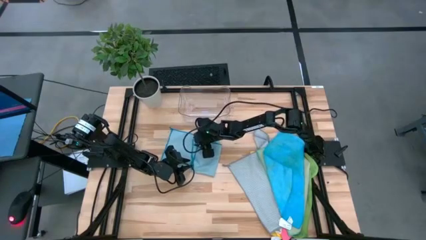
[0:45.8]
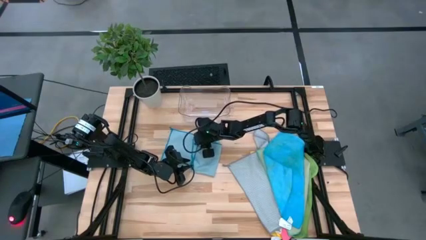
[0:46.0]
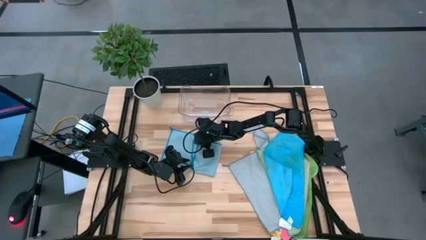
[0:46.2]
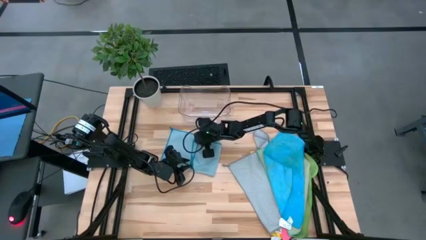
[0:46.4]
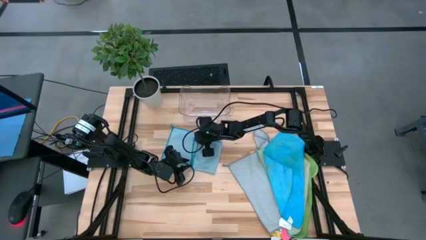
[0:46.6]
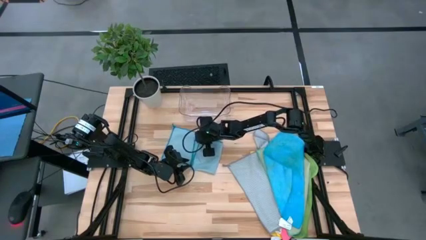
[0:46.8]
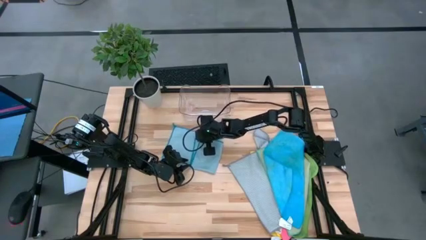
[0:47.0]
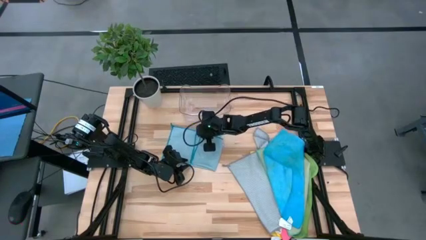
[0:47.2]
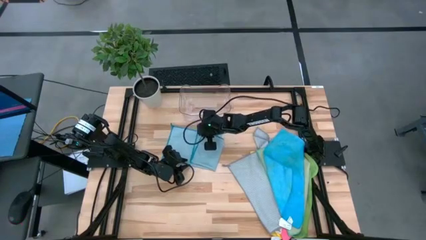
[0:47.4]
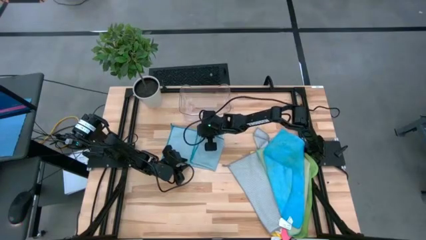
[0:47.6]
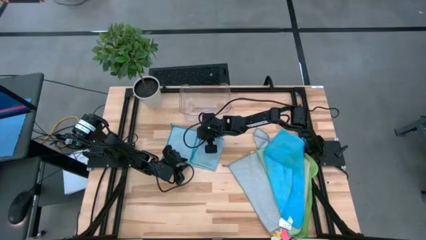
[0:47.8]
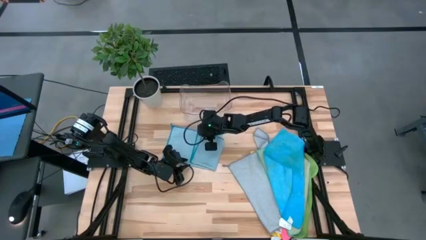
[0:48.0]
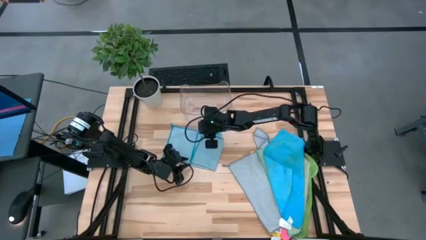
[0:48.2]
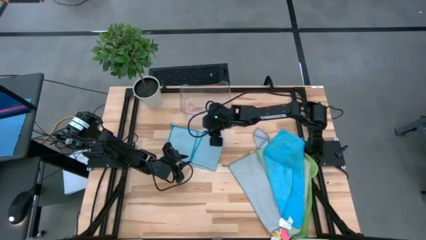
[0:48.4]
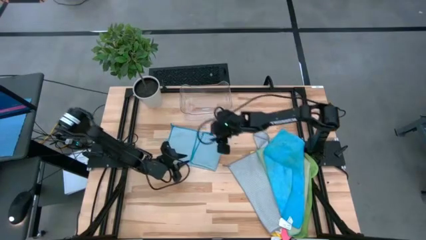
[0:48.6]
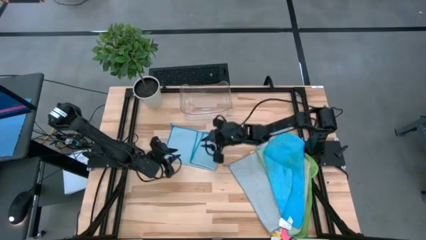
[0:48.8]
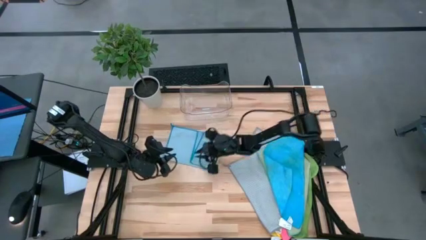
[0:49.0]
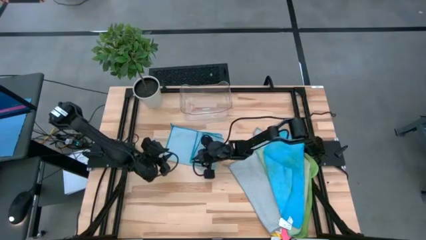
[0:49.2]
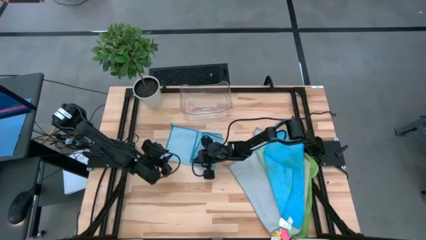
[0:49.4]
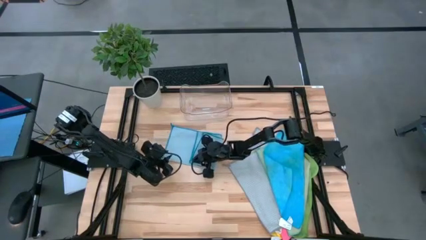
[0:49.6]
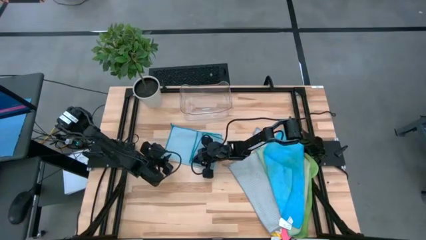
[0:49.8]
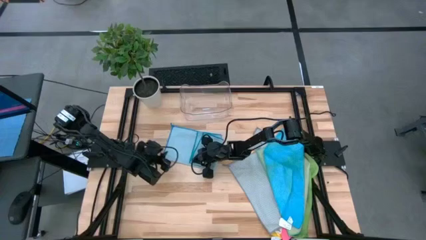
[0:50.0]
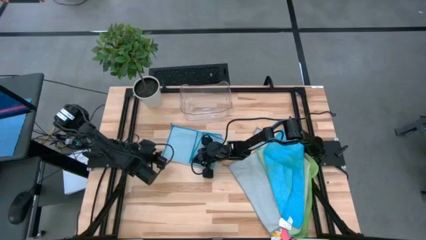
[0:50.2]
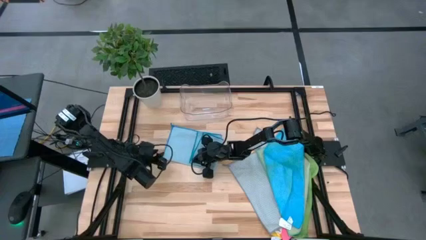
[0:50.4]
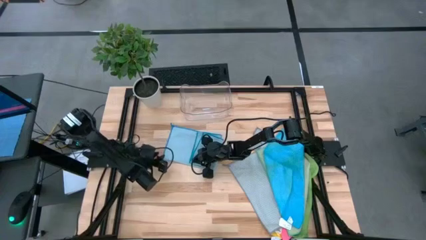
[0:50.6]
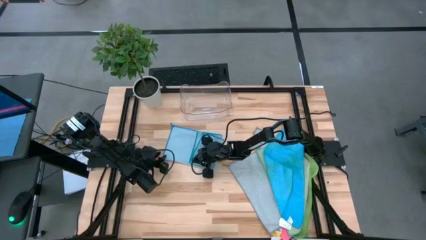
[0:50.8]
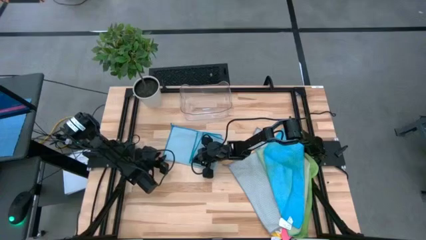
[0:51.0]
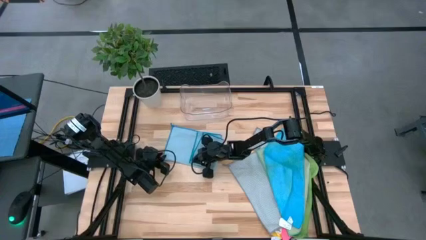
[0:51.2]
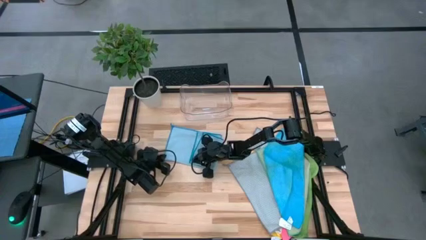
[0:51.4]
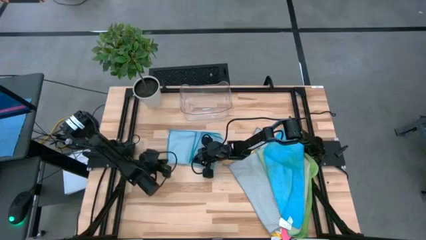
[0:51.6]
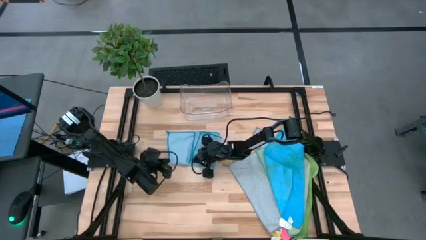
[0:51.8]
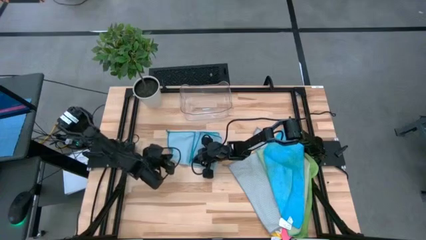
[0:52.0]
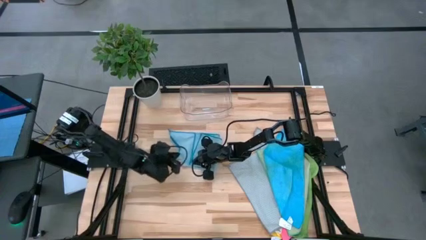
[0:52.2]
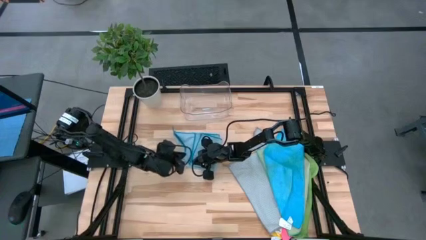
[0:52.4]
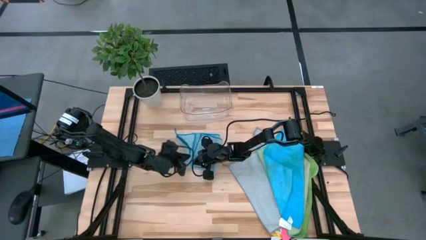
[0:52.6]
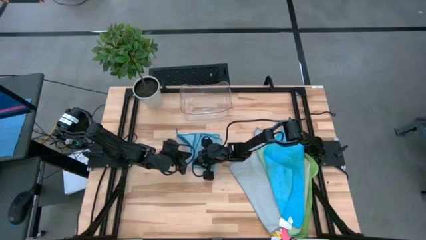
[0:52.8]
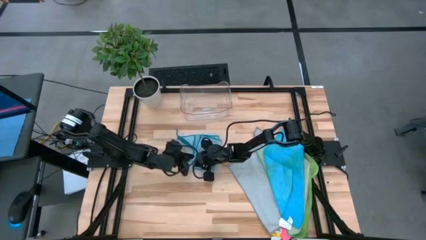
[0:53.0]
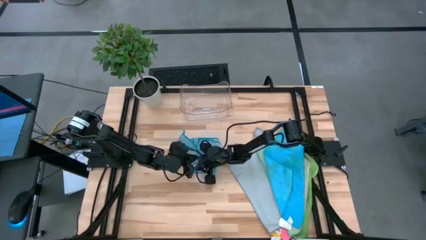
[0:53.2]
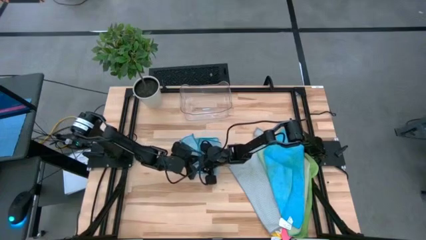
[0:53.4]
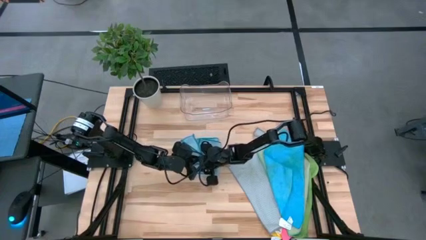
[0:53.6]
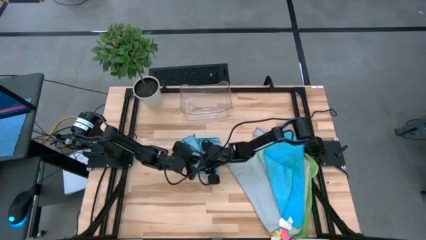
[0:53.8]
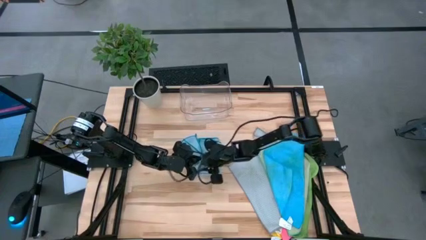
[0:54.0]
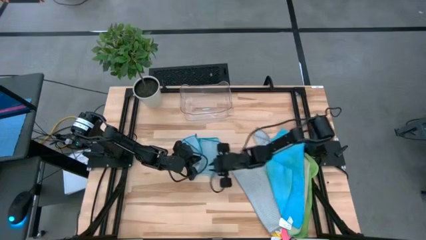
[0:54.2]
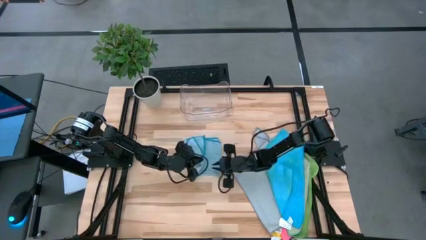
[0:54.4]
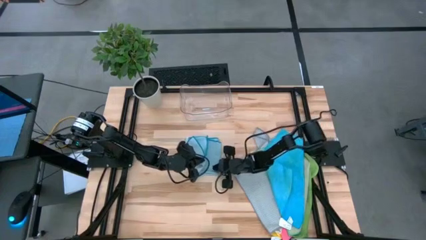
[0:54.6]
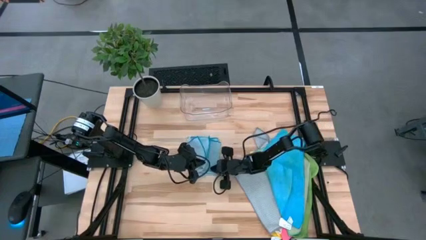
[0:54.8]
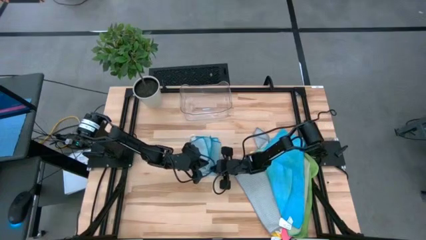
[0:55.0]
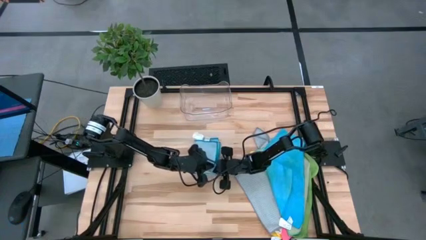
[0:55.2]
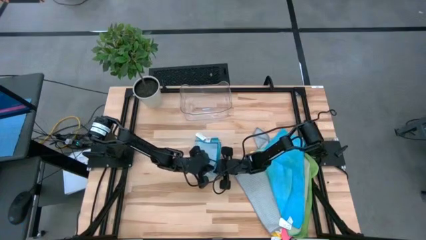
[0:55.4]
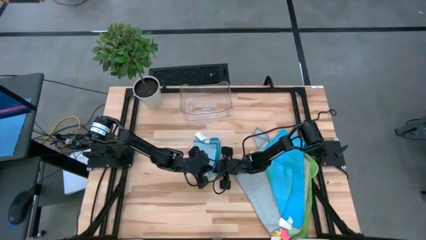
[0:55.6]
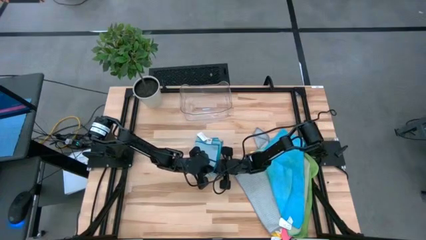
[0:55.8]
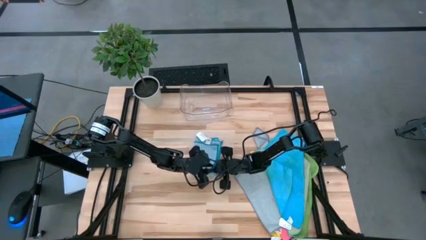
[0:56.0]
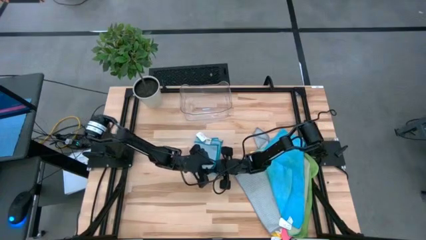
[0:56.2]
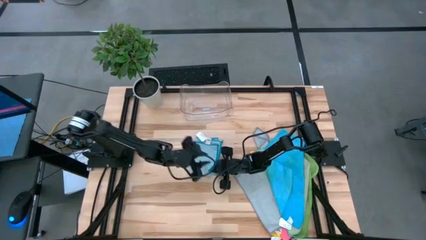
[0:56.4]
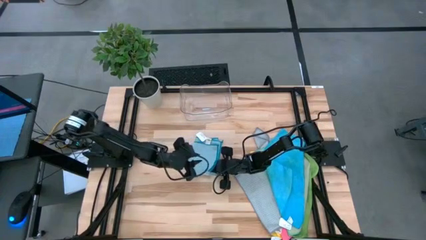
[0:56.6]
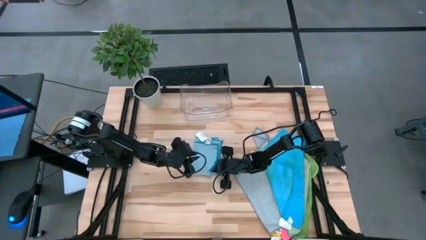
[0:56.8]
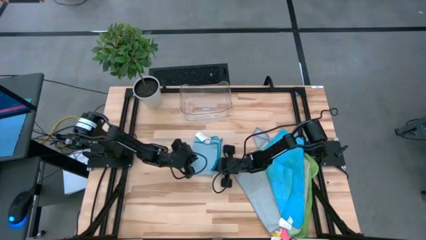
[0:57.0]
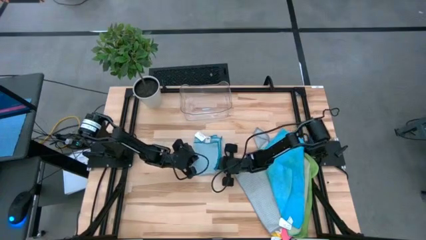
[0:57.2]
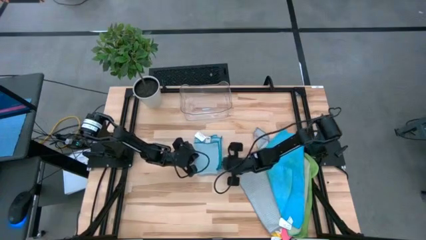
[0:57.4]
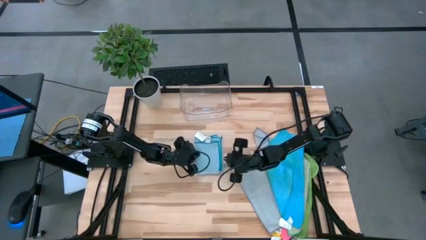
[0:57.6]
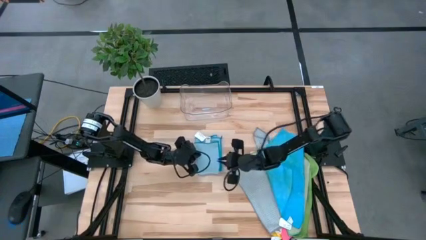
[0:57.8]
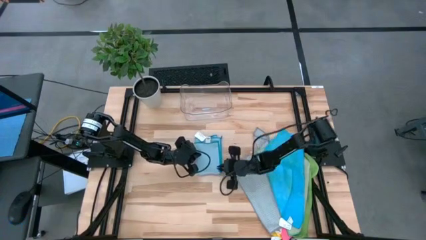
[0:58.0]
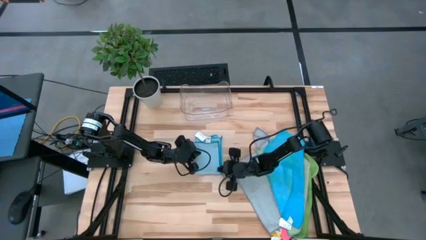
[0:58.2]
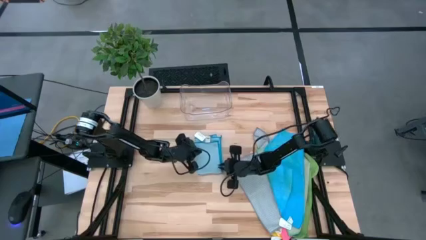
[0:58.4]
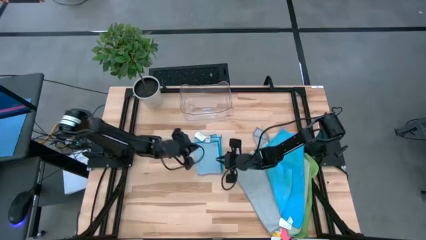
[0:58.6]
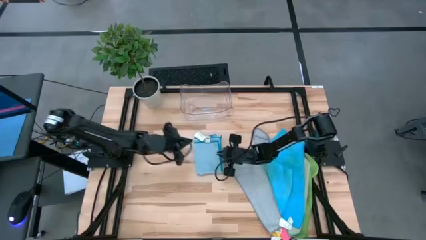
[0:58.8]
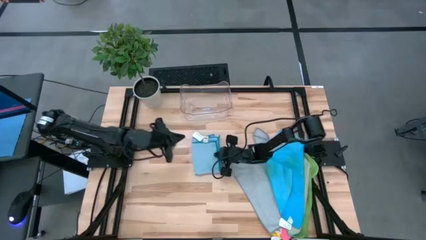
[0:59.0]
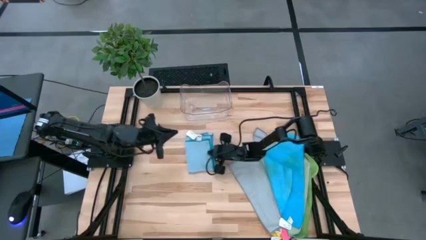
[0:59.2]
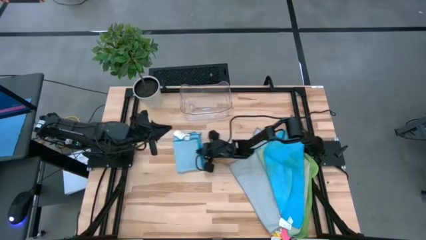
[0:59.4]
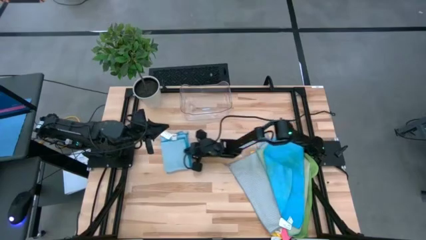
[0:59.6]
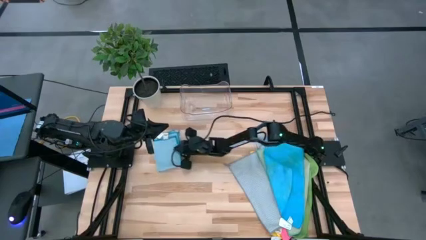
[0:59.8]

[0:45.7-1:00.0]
Task: Fold microfiber towels
Fold the light blue microfiber cloth
